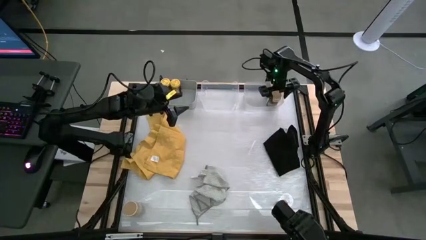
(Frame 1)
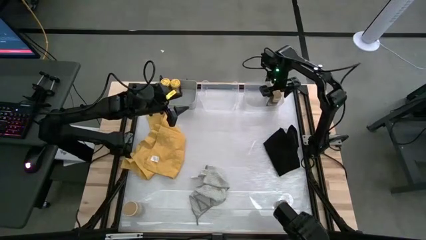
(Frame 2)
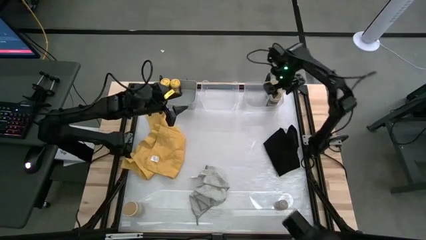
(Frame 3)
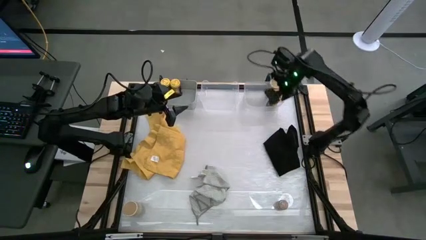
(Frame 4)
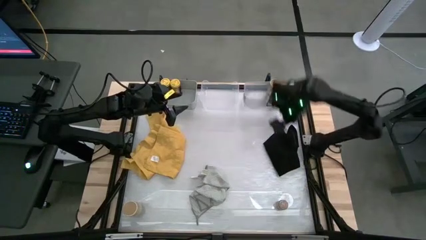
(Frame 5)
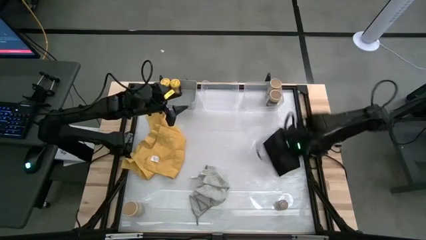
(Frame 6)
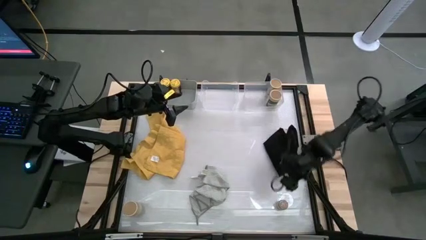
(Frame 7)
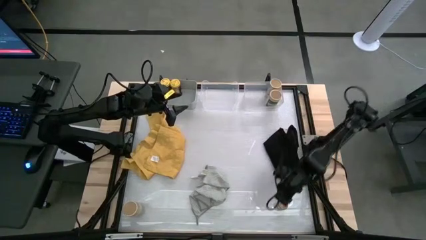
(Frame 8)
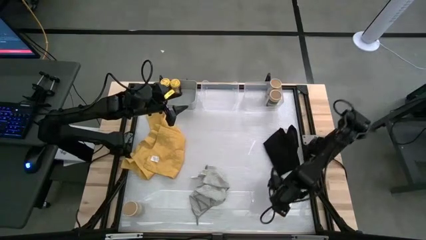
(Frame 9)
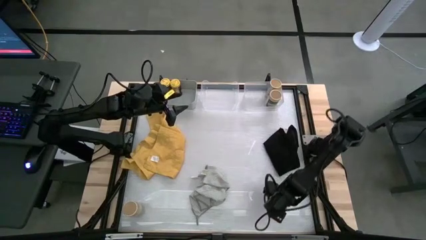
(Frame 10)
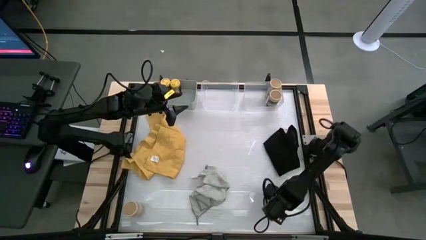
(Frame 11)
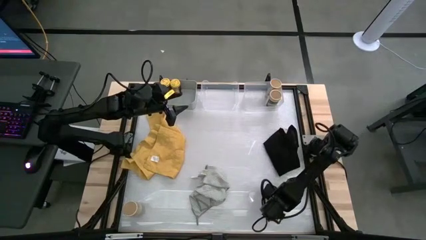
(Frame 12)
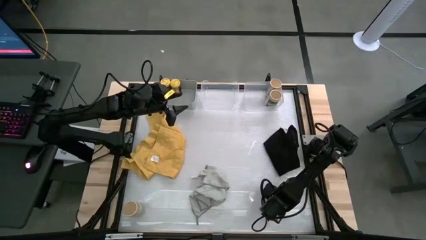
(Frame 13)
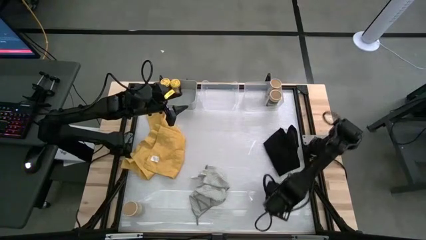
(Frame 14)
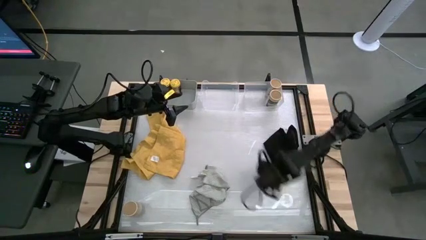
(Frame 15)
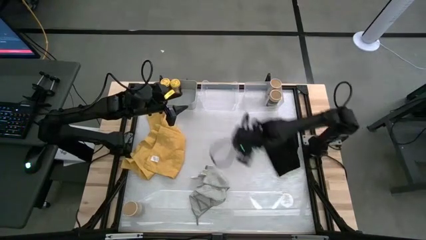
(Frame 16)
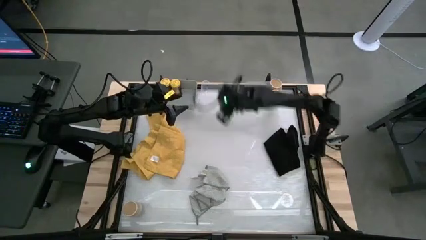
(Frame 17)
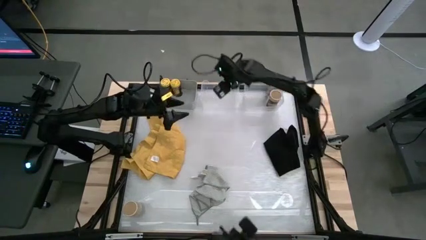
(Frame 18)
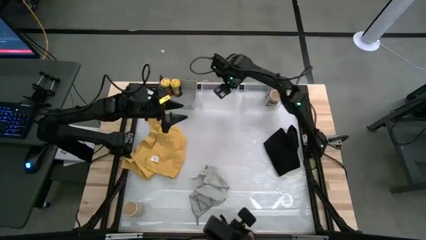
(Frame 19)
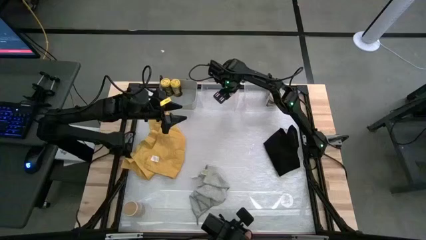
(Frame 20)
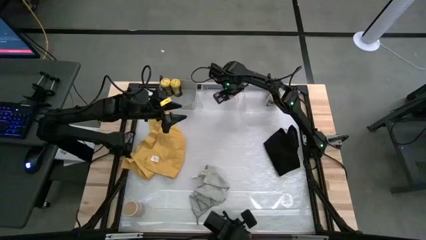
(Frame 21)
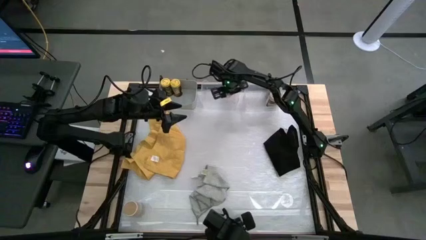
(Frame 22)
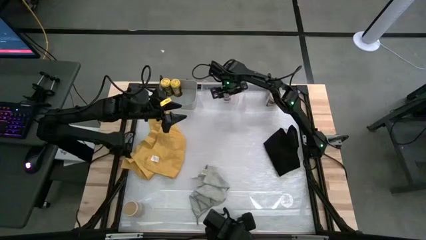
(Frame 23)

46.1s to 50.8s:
Task: Sort spices by type
Put the bottom transparent bottle into the left transparent bin

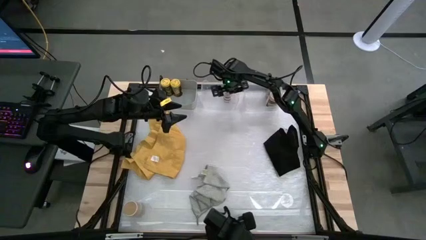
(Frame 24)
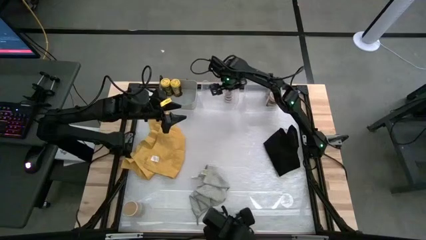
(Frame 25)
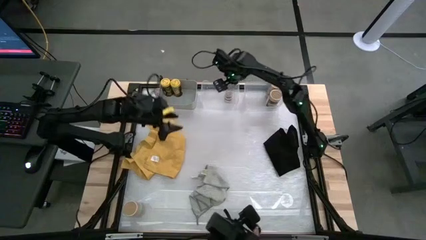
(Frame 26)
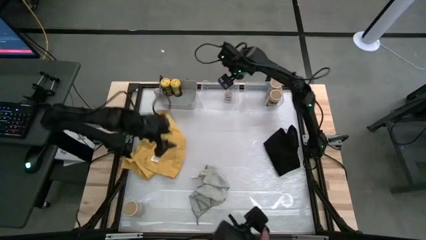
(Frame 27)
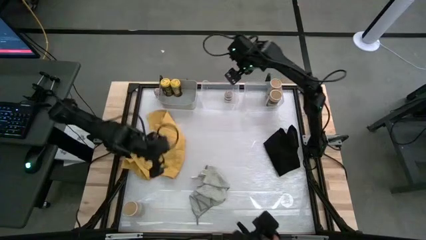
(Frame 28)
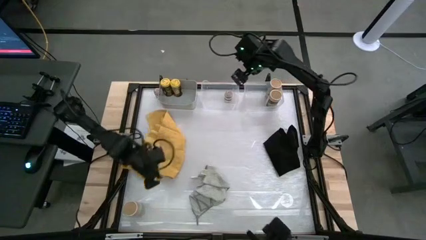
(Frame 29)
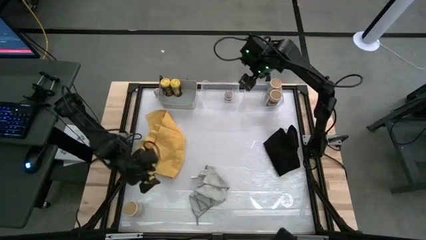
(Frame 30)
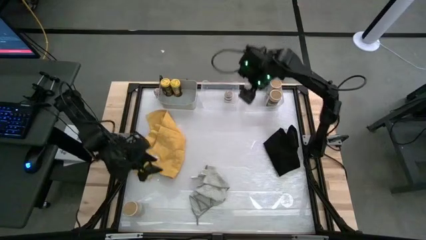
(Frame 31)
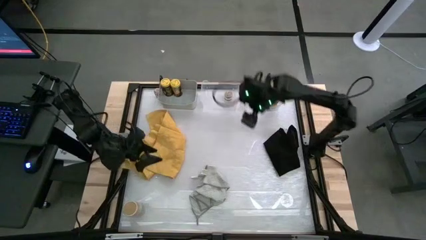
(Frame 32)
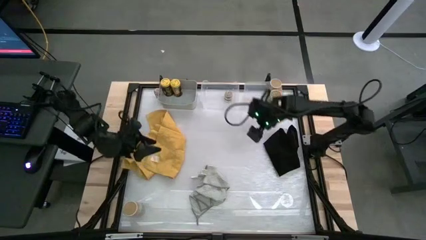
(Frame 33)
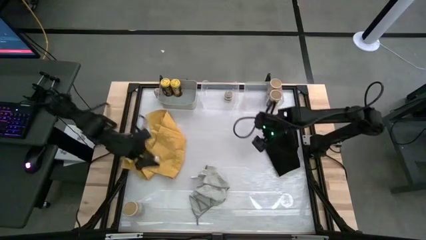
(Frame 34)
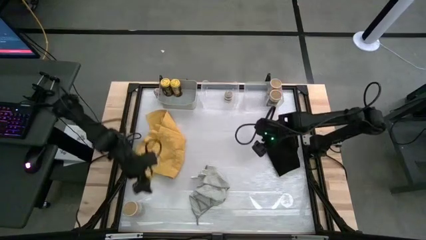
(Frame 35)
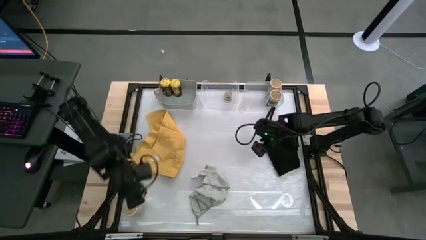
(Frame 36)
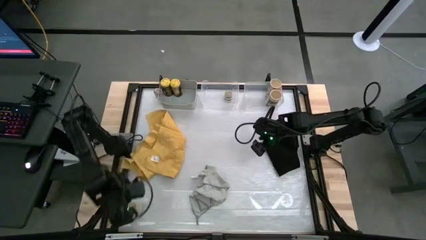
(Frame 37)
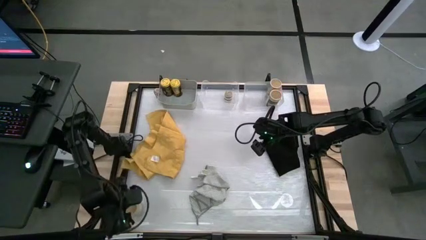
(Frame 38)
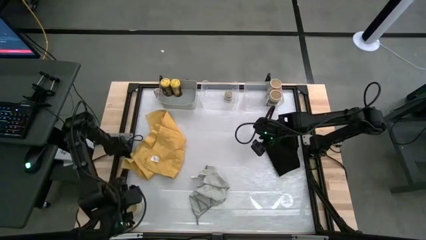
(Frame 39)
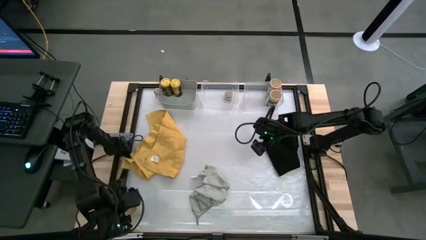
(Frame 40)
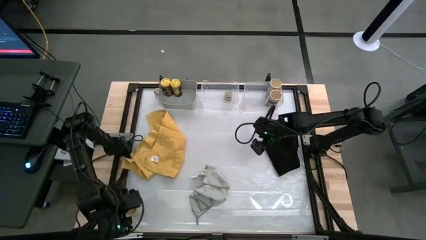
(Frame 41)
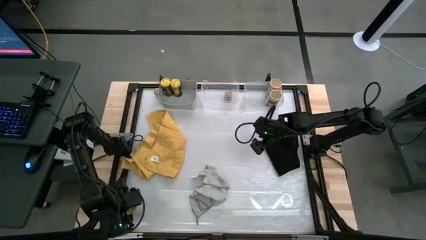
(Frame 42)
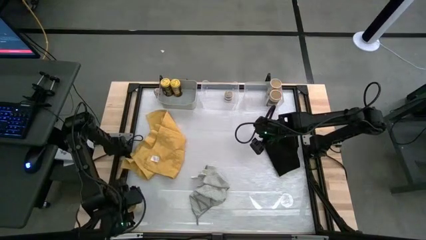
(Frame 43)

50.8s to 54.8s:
Put the gold seasoning bottle into the right transparent bin

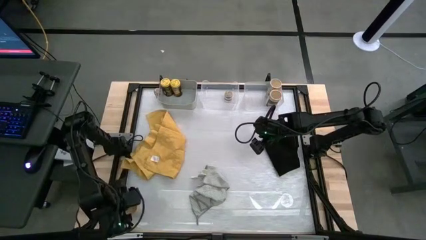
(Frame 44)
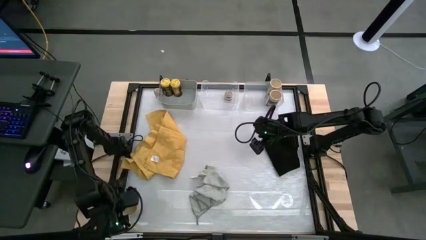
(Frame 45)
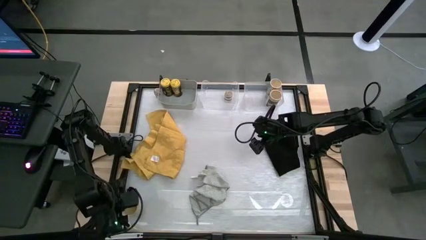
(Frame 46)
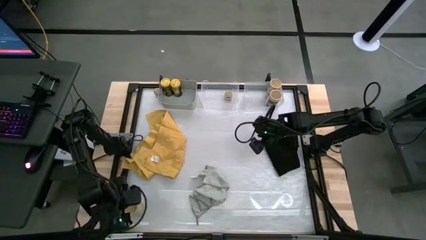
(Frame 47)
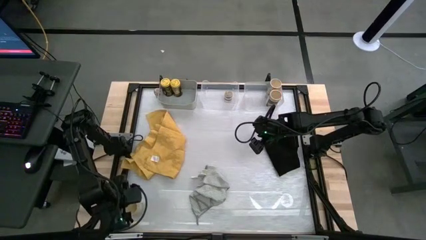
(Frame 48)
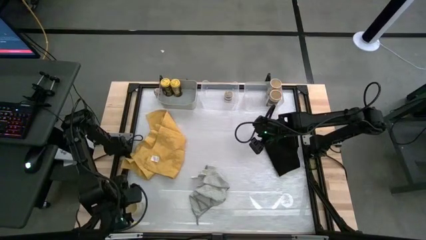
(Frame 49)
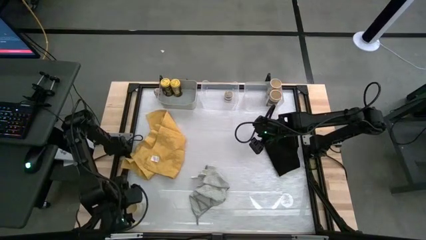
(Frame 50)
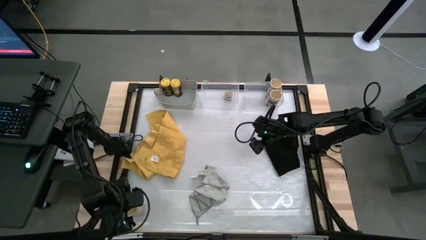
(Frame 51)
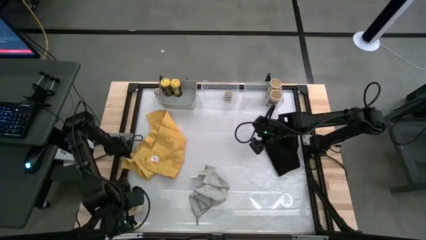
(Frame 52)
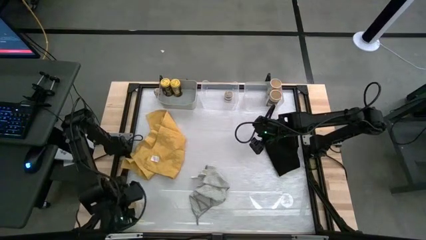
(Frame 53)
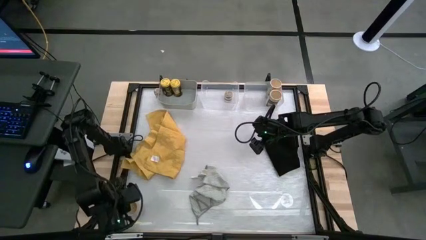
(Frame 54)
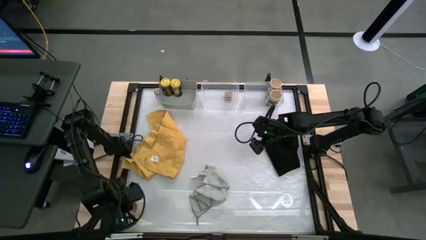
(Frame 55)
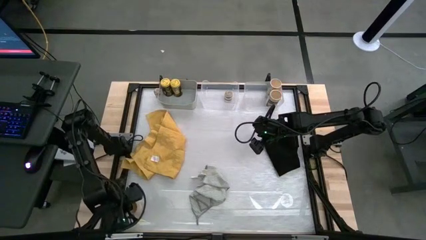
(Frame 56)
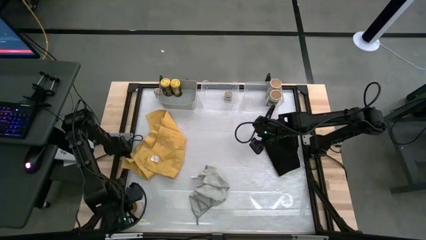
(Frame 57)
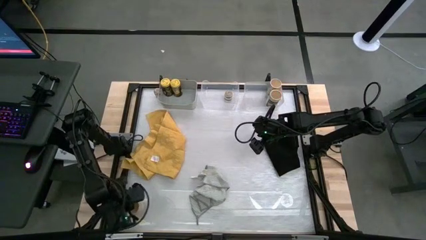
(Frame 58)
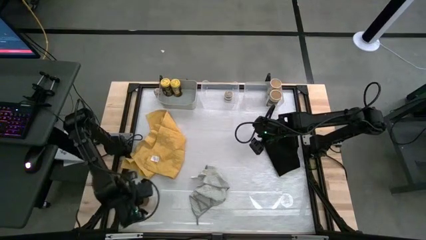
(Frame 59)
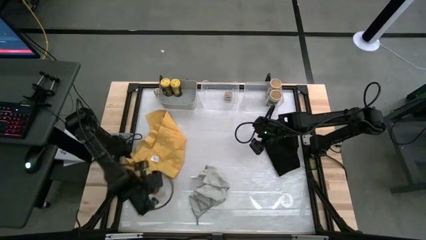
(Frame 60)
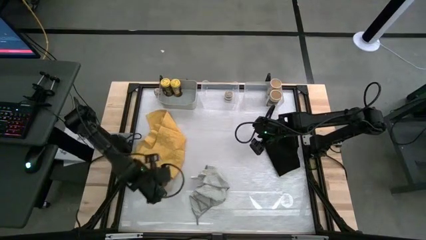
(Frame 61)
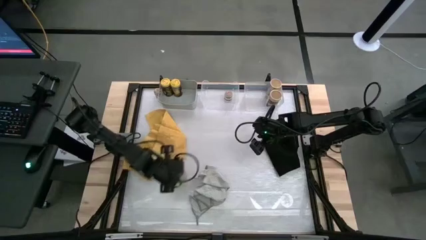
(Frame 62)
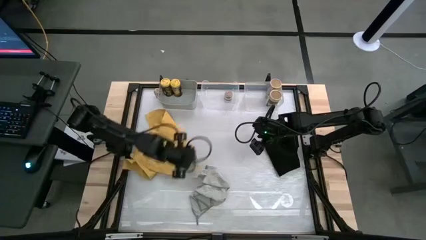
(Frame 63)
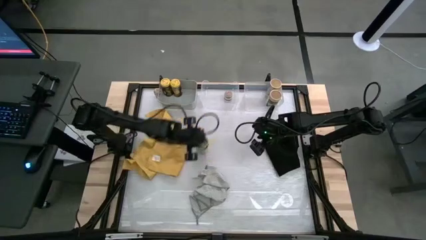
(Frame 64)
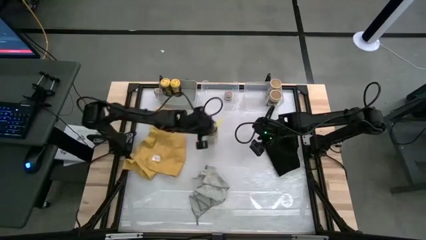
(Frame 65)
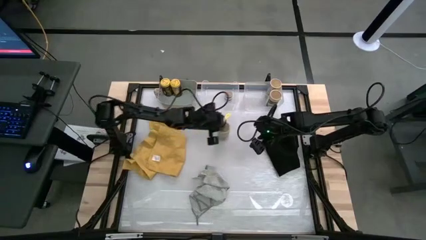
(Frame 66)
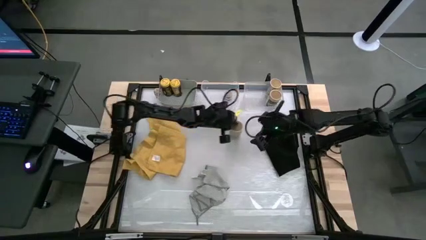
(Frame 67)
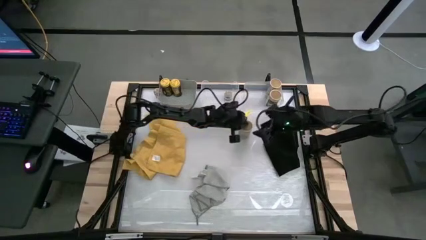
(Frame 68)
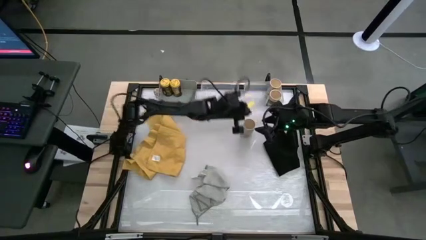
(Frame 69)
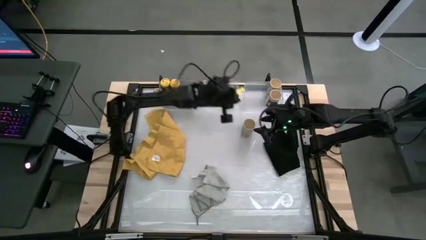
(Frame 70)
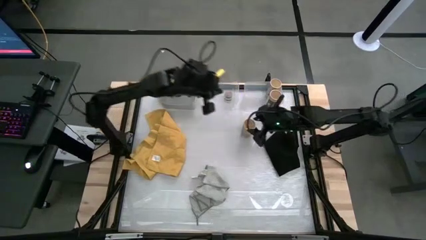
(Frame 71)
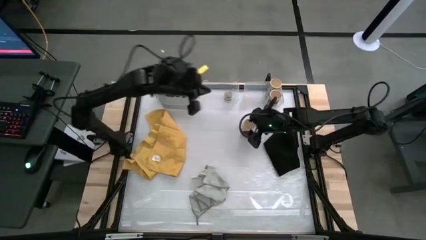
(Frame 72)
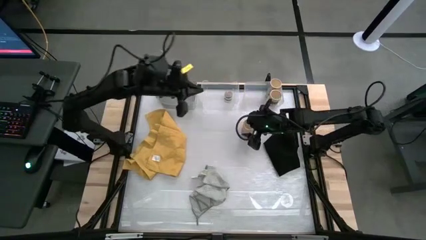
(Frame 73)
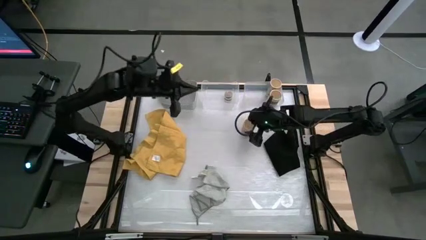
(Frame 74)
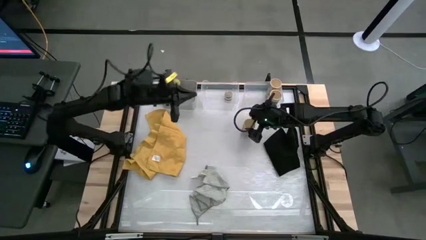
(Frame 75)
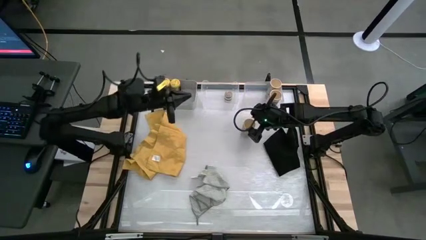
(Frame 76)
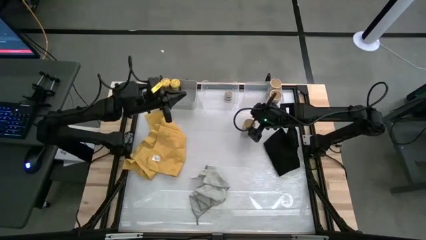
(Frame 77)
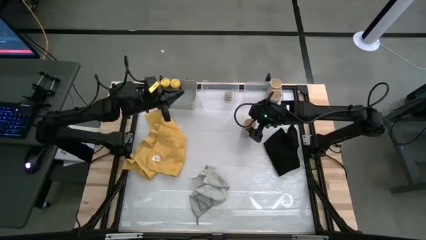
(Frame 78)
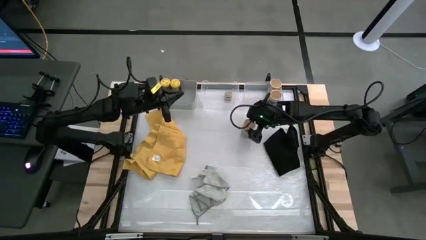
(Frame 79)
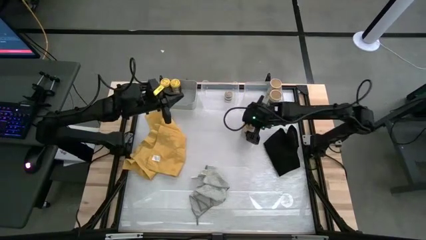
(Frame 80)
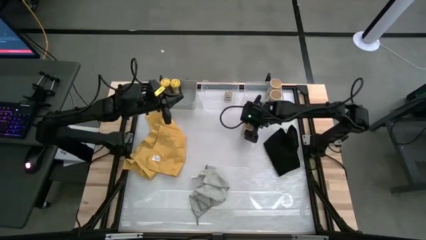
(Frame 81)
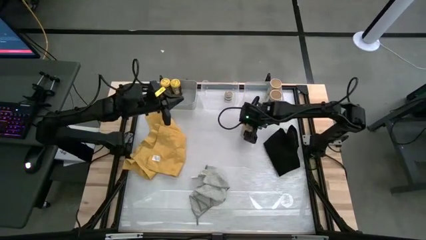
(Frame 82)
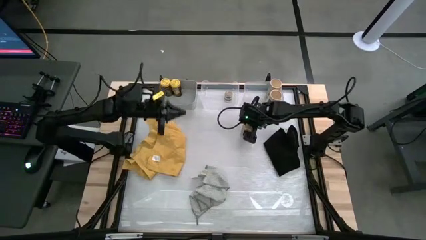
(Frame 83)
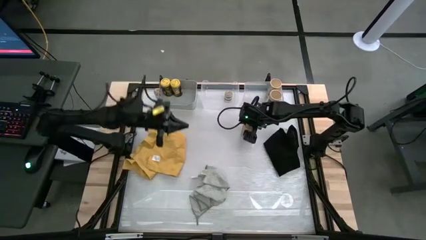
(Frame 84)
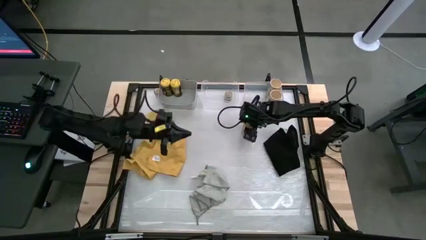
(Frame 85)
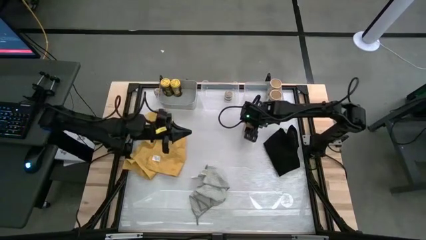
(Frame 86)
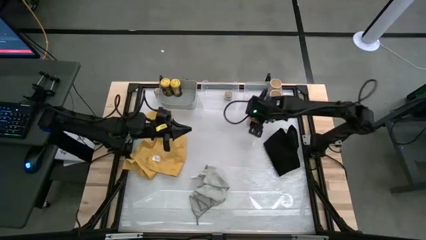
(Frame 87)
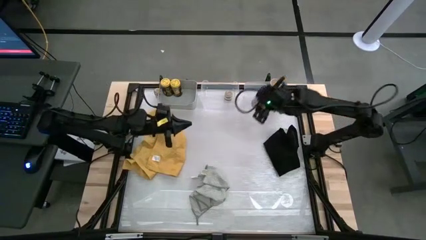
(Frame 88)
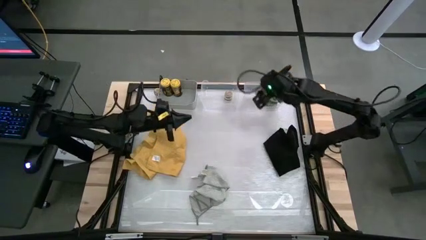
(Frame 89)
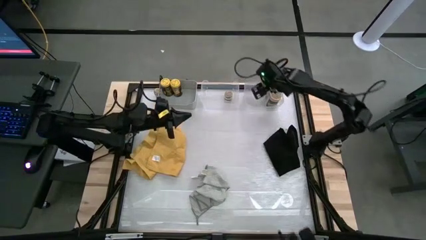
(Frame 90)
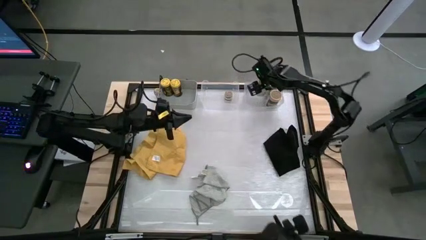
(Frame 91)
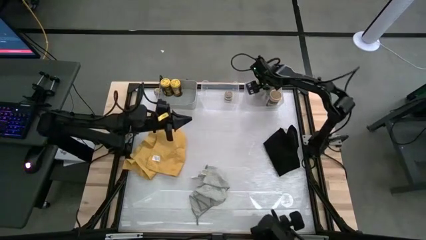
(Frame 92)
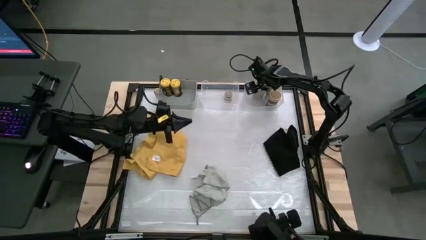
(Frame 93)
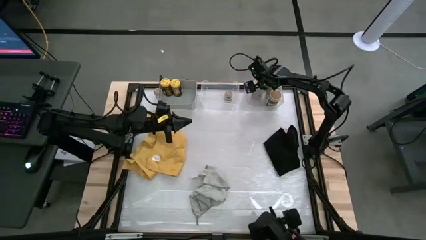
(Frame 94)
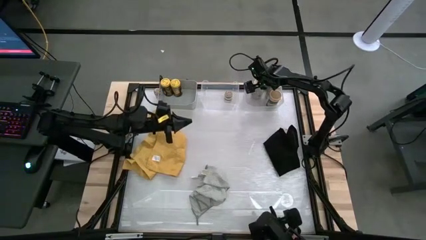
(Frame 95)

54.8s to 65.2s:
Put the gold seasoning bottle into the right transparent bin
